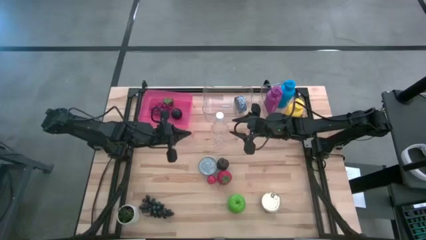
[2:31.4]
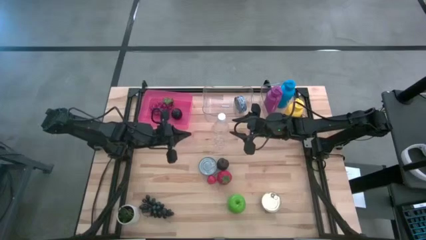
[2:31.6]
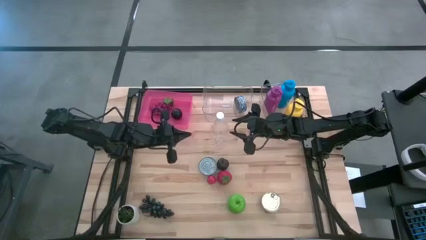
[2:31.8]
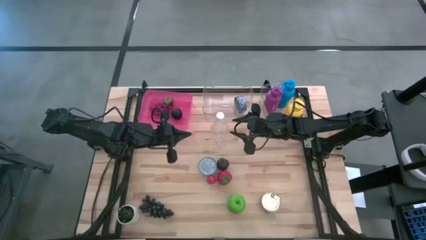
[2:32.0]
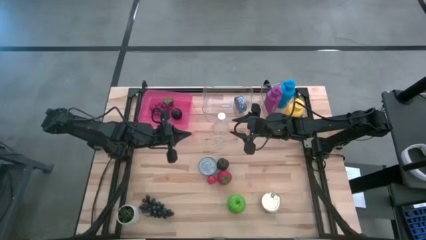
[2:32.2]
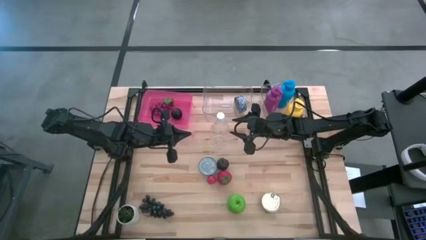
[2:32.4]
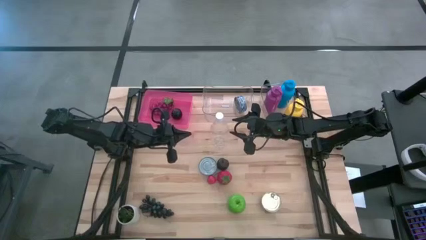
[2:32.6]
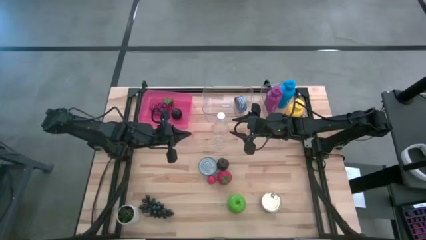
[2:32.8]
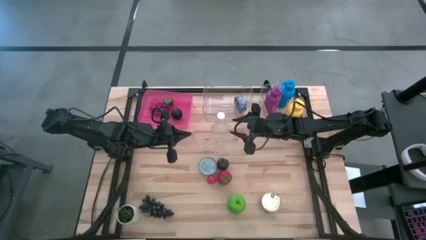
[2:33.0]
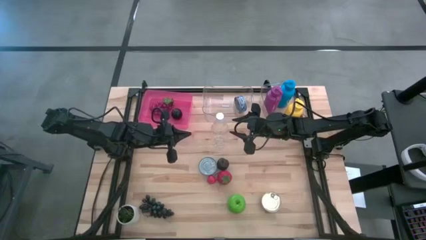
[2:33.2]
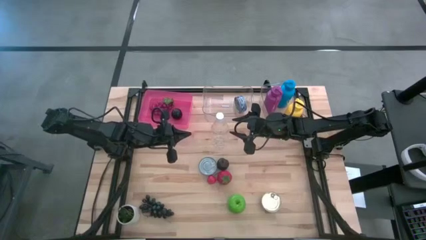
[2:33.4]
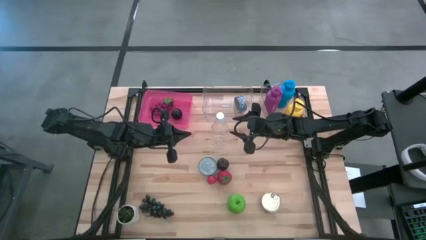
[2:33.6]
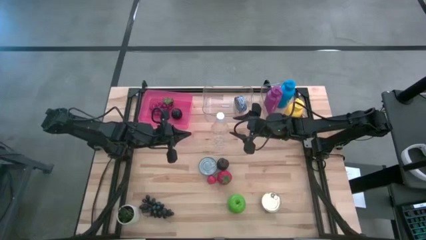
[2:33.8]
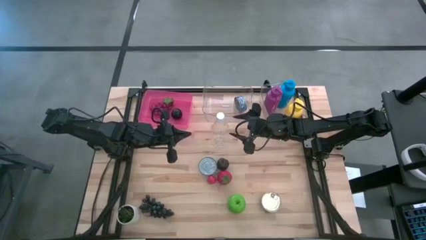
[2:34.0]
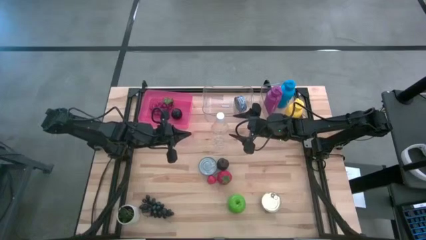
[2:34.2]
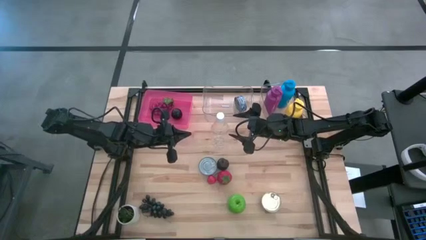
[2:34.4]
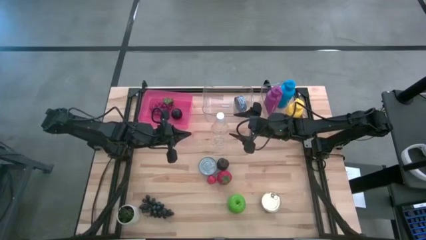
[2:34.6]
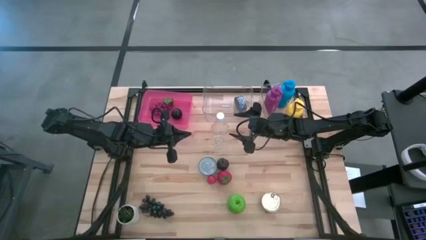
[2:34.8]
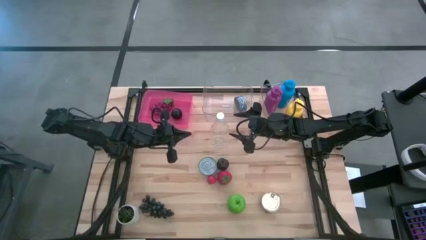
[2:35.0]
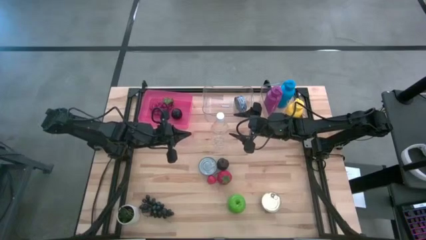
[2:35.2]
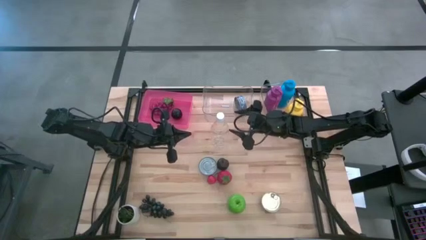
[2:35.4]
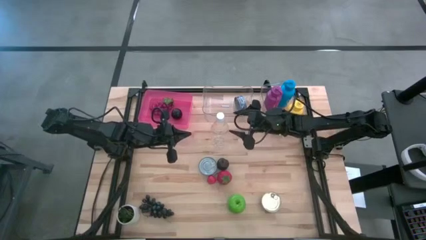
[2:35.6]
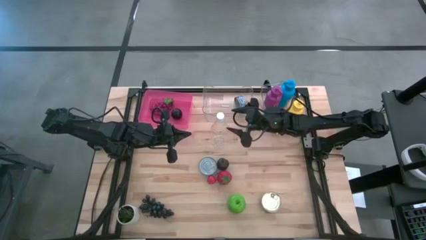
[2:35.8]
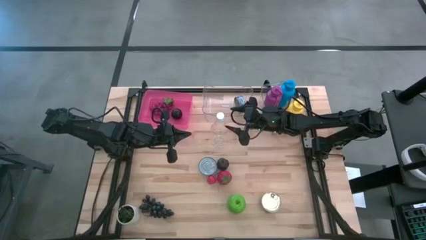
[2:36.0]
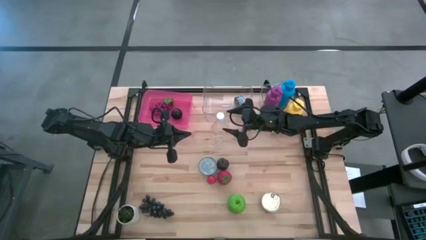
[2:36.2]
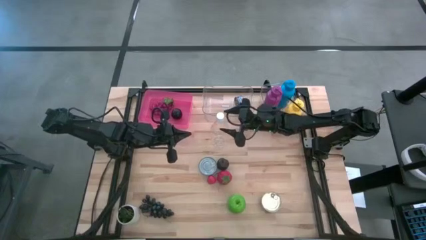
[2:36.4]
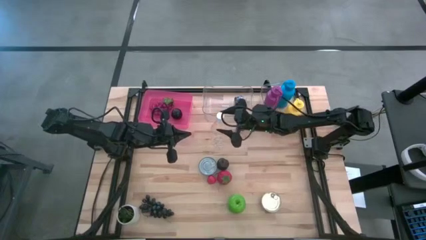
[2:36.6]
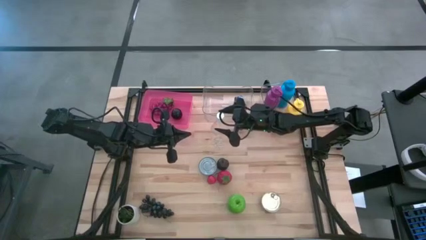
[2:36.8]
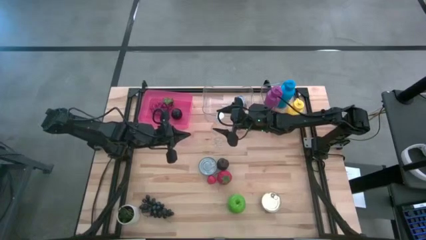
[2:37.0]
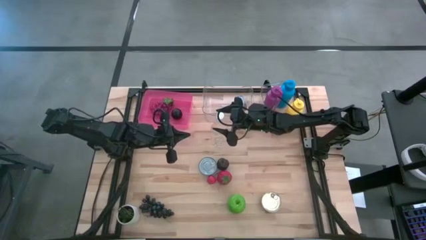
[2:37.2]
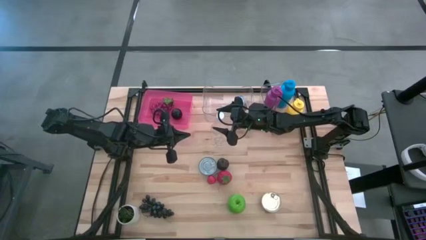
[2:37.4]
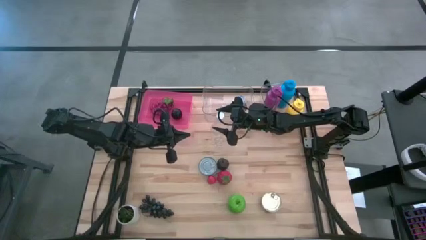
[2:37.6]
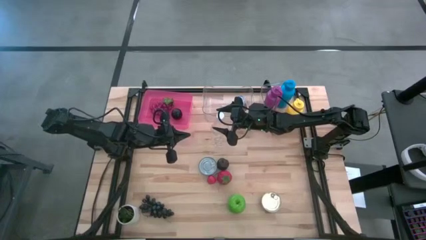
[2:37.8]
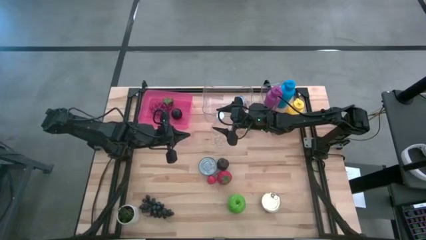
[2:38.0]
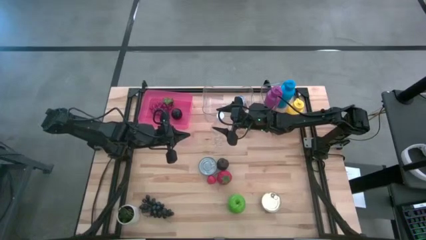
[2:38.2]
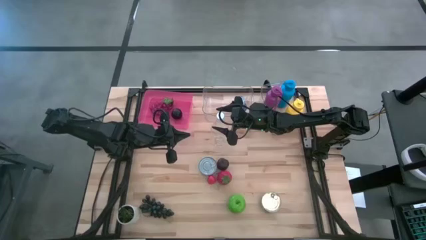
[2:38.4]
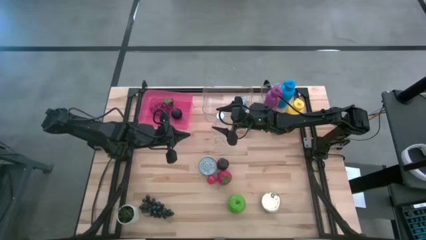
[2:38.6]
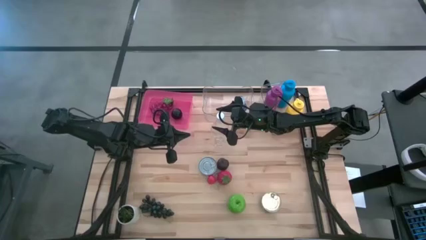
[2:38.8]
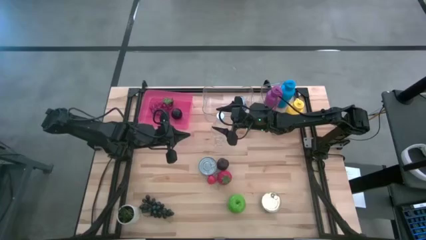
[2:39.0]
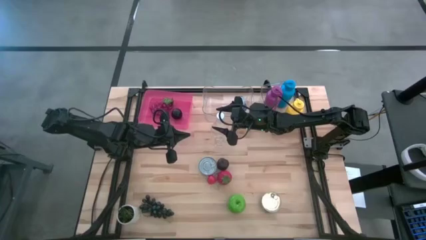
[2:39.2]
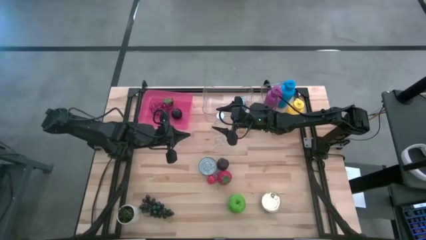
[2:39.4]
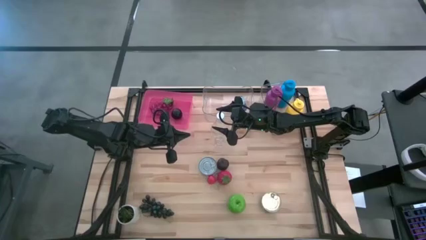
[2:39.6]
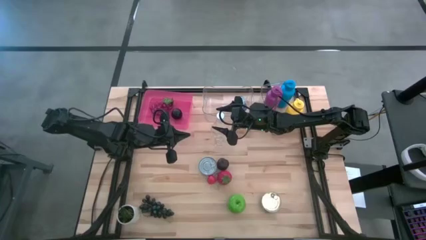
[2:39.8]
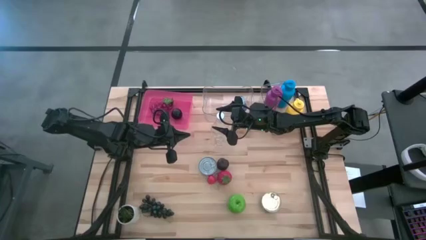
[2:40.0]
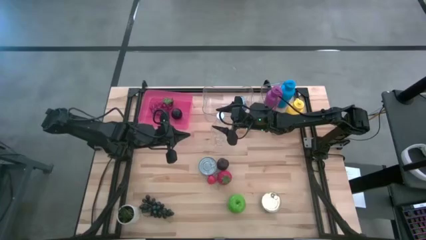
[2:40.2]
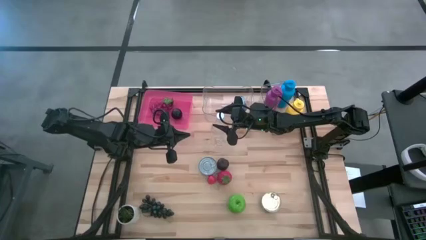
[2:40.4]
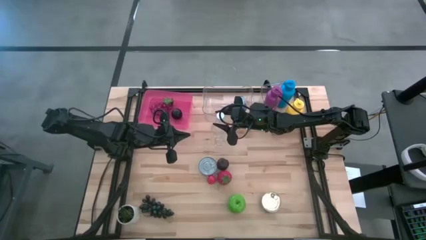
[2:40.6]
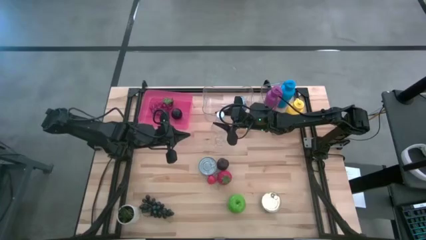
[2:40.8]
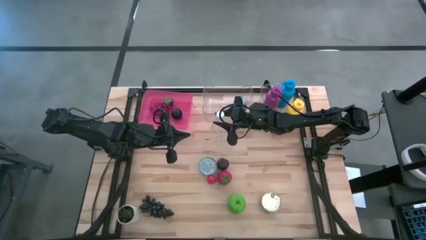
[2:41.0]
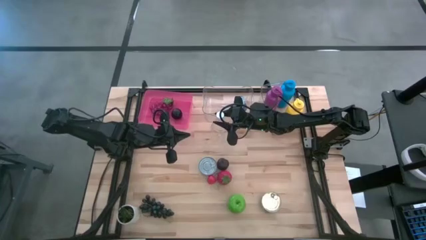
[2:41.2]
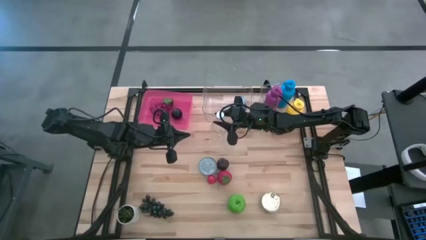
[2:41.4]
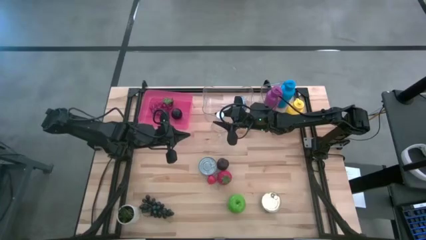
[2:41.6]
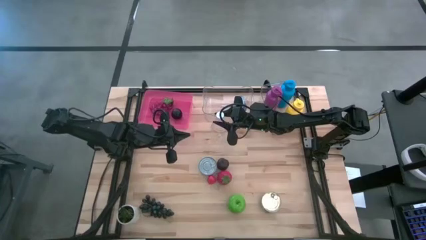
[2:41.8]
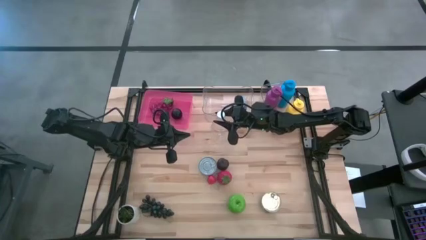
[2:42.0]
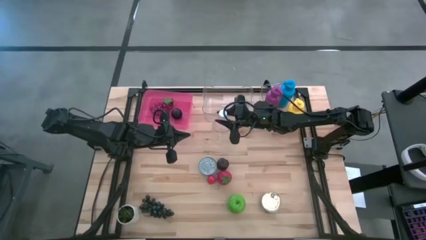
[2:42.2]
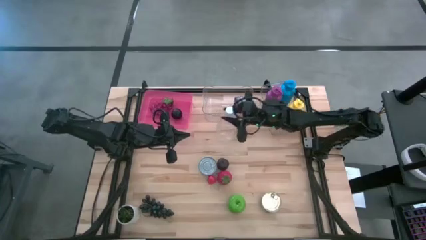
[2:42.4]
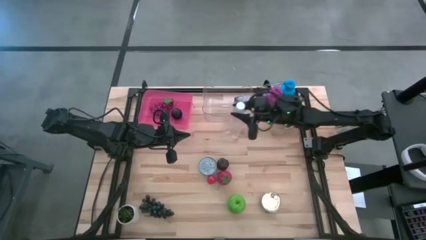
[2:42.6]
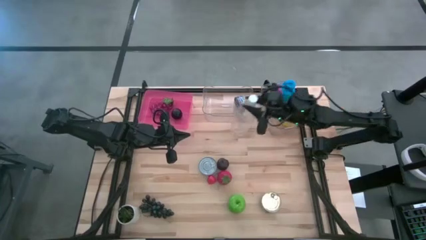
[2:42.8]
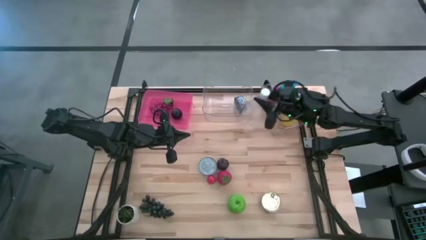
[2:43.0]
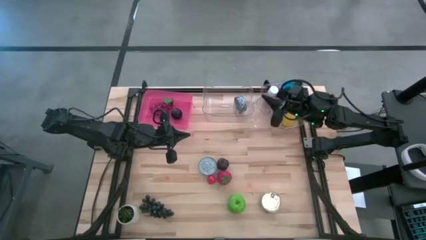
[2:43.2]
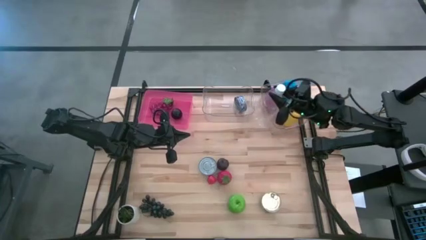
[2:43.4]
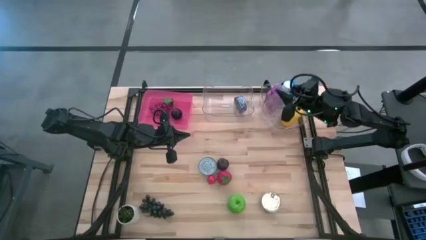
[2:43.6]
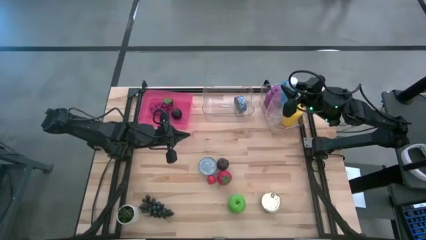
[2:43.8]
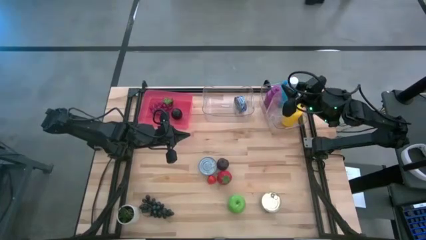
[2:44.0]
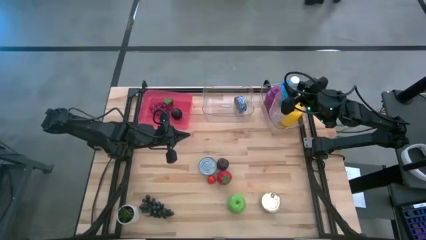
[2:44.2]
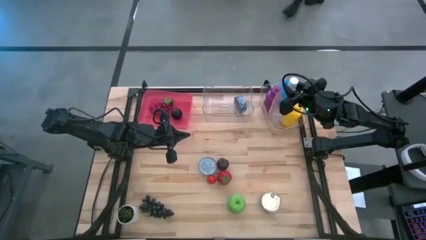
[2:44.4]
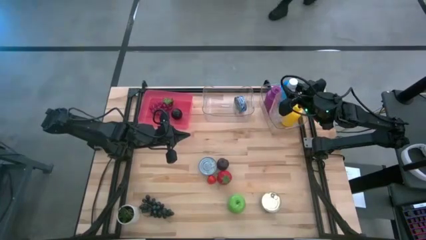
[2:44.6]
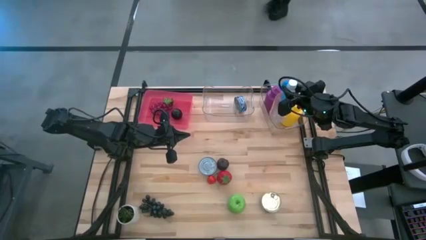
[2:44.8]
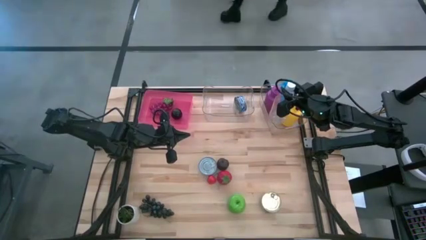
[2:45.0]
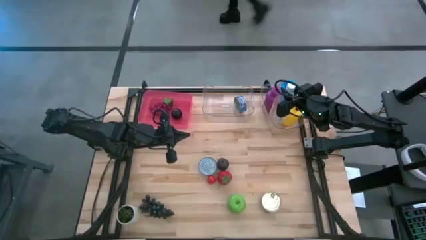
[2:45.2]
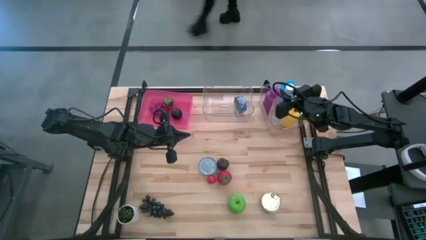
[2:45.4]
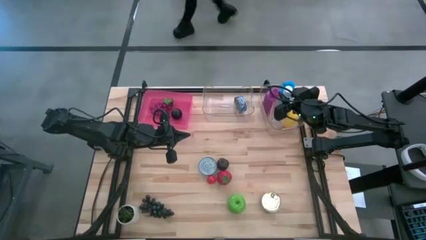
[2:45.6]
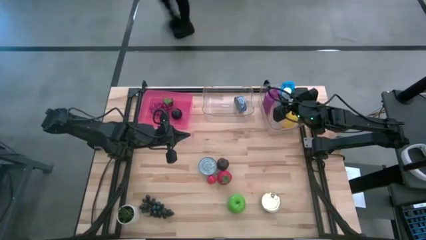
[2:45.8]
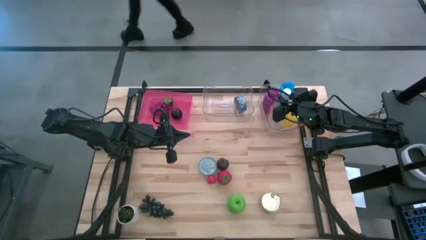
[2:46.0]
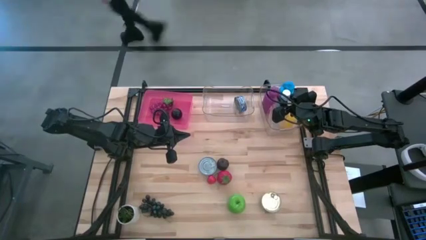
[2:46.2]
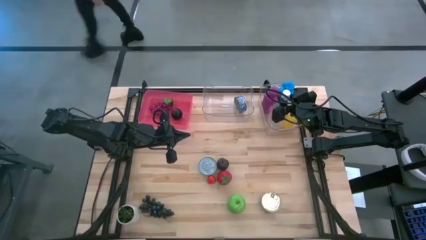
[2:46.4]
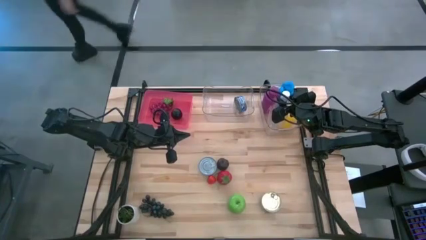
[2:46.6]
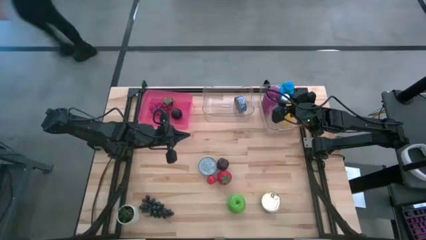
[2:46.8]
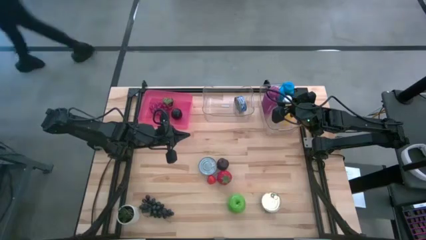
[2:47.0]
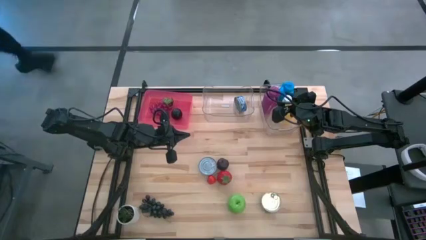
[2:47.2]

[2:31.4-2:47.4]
Task: Pick & Place Food Item
Put the transparent water bottle into the right transparent bin
